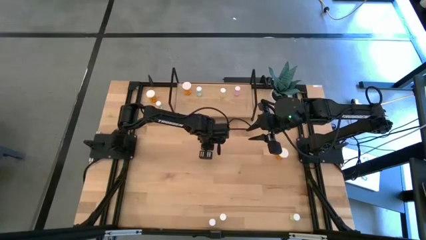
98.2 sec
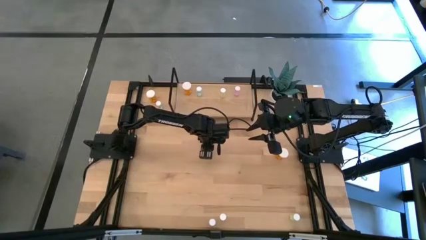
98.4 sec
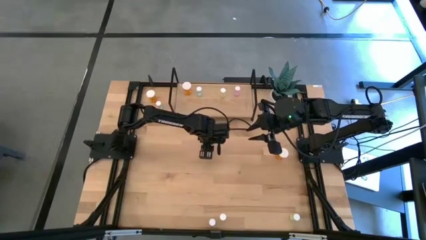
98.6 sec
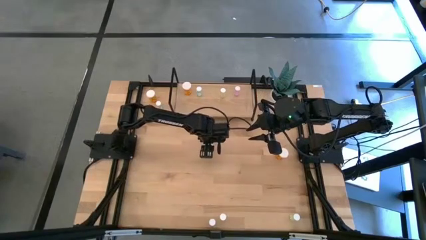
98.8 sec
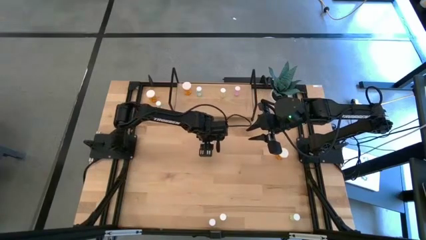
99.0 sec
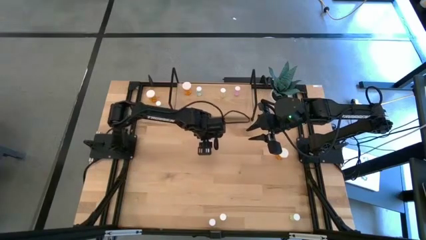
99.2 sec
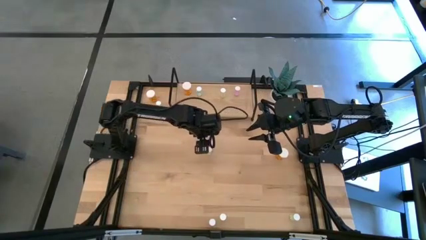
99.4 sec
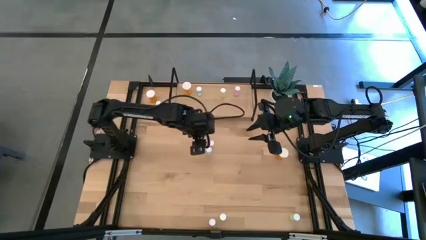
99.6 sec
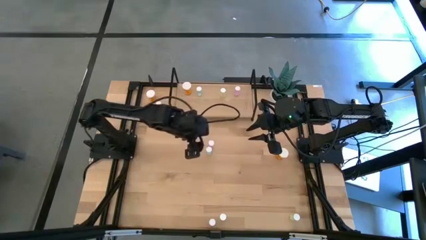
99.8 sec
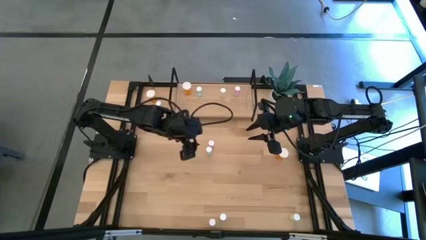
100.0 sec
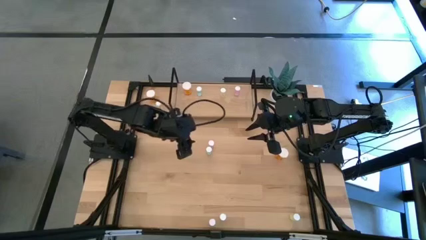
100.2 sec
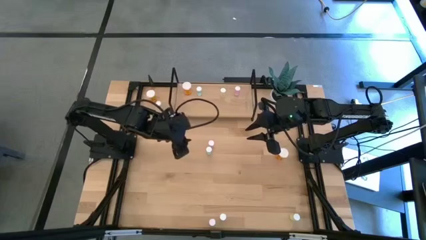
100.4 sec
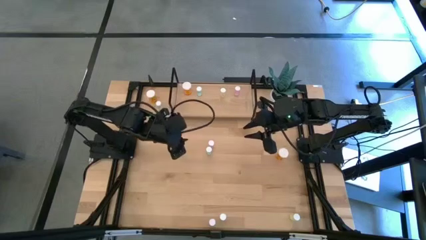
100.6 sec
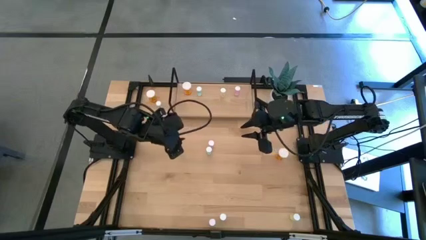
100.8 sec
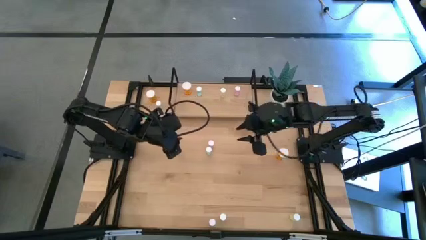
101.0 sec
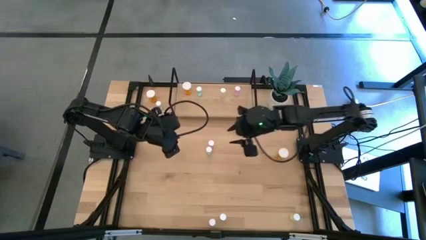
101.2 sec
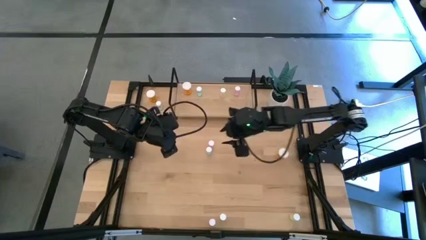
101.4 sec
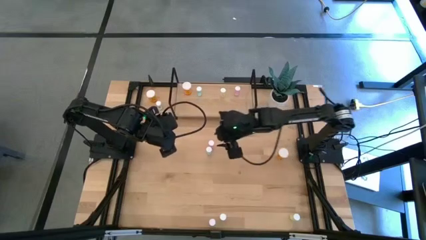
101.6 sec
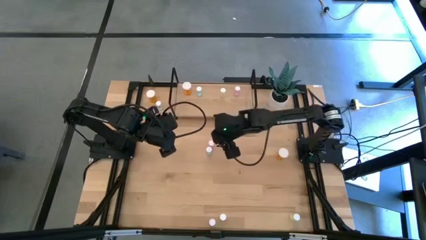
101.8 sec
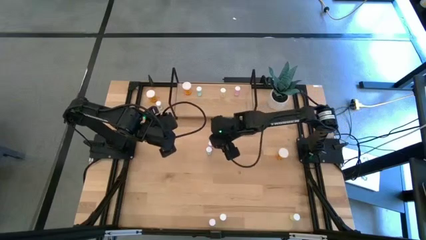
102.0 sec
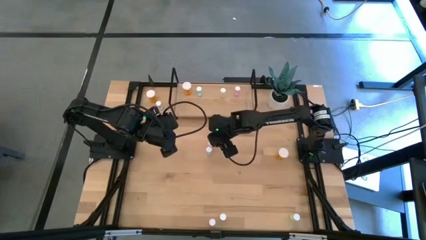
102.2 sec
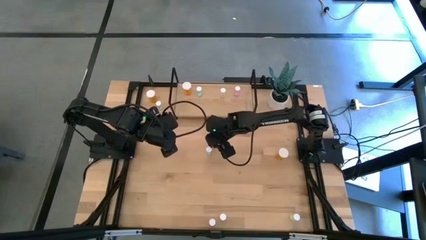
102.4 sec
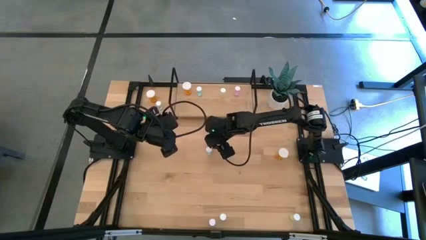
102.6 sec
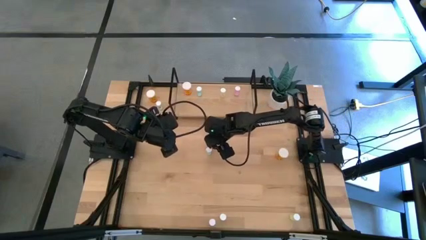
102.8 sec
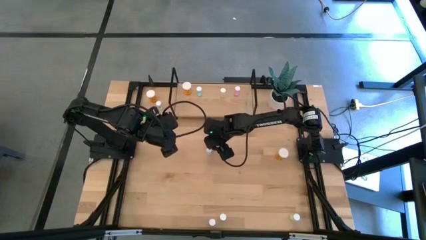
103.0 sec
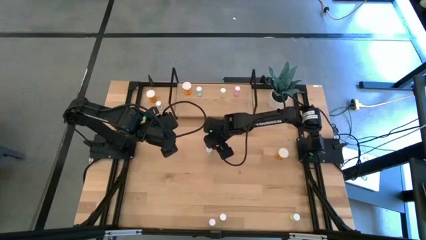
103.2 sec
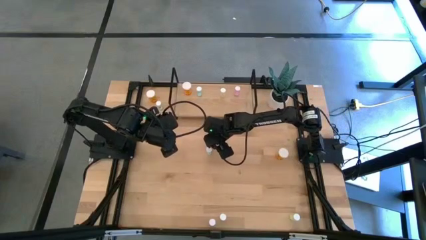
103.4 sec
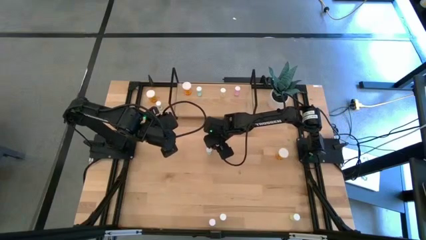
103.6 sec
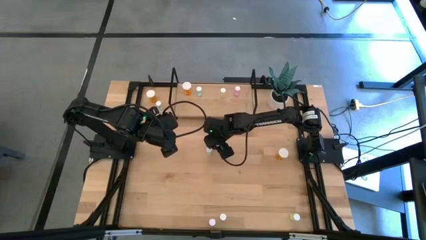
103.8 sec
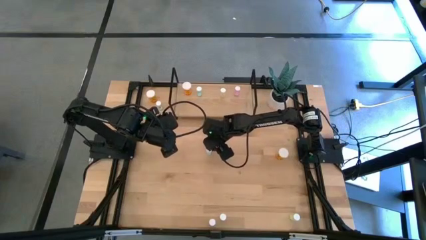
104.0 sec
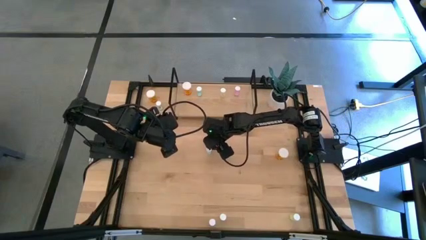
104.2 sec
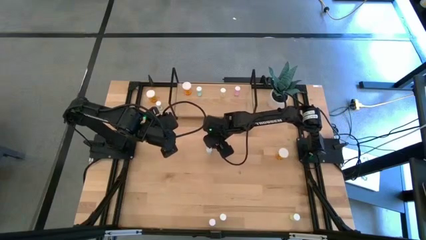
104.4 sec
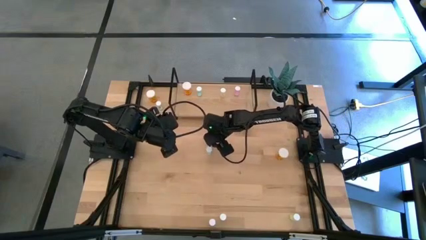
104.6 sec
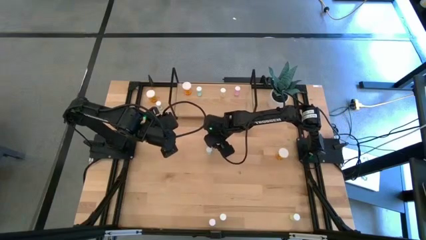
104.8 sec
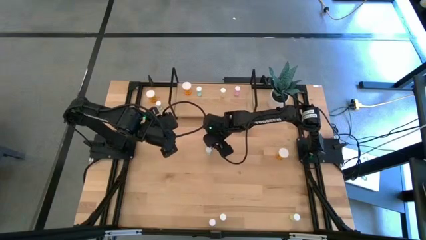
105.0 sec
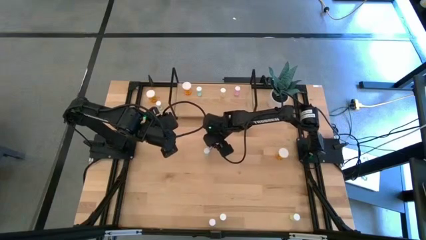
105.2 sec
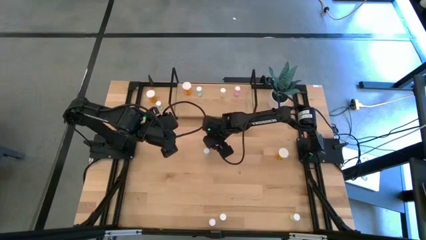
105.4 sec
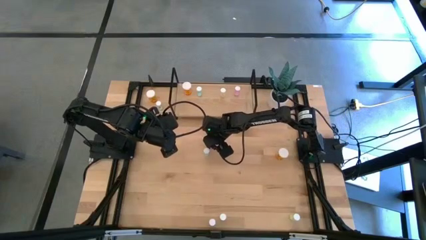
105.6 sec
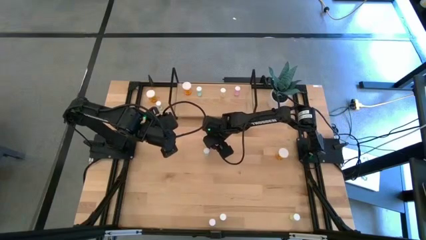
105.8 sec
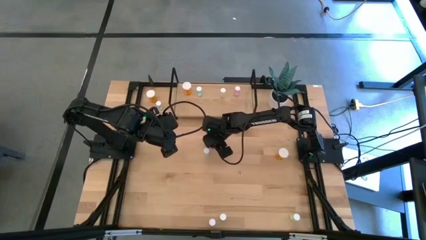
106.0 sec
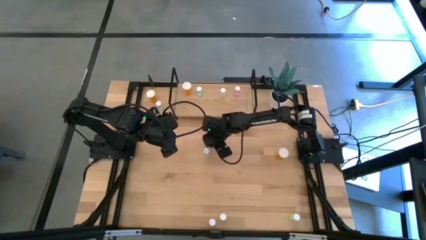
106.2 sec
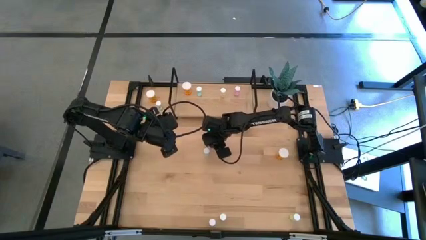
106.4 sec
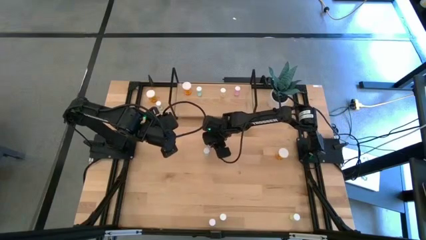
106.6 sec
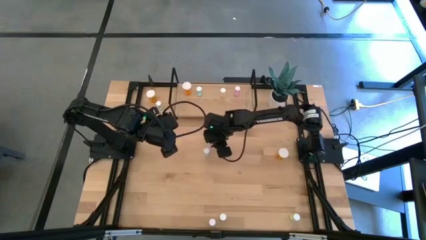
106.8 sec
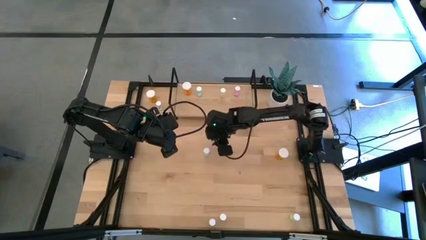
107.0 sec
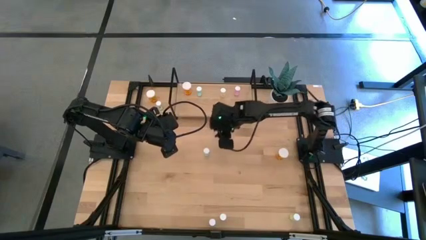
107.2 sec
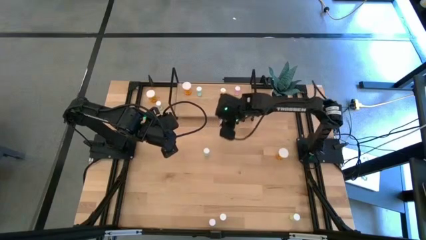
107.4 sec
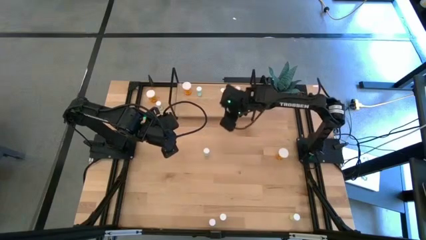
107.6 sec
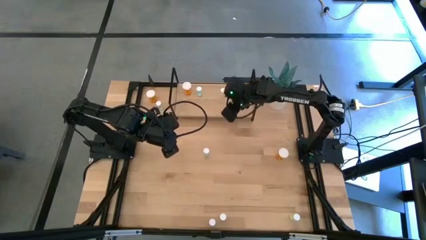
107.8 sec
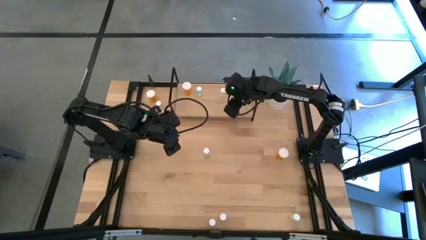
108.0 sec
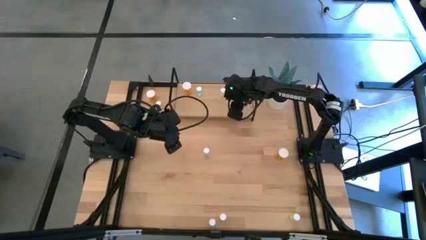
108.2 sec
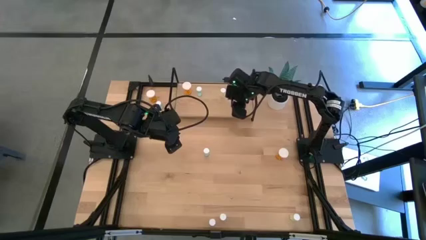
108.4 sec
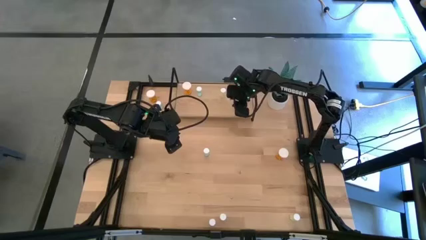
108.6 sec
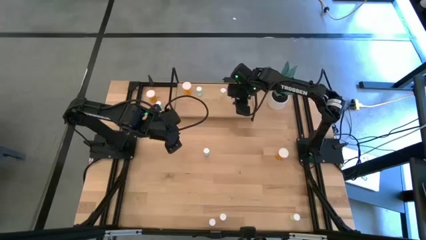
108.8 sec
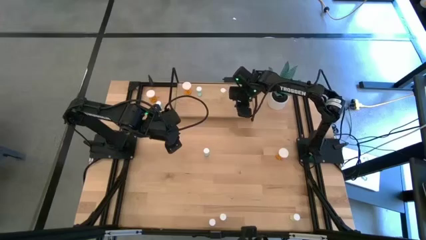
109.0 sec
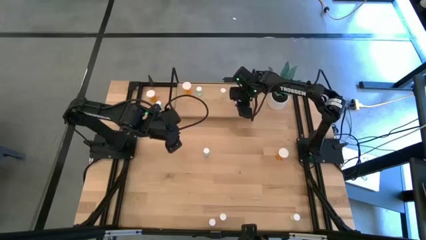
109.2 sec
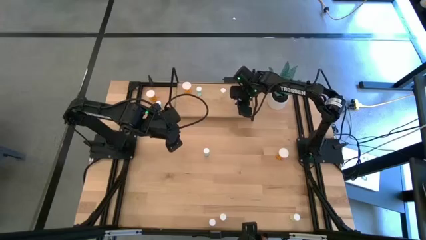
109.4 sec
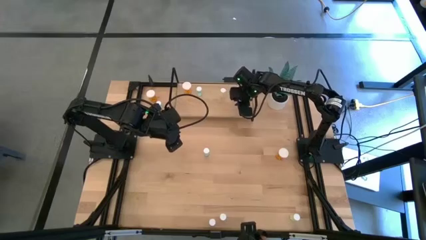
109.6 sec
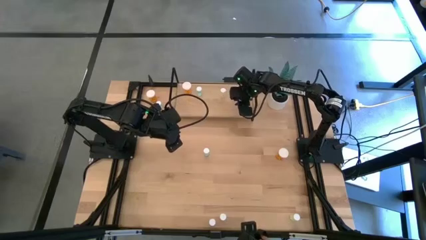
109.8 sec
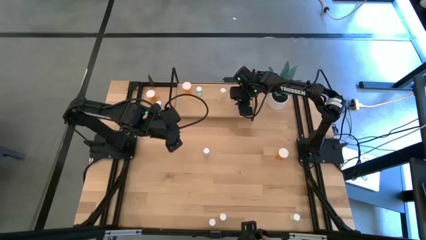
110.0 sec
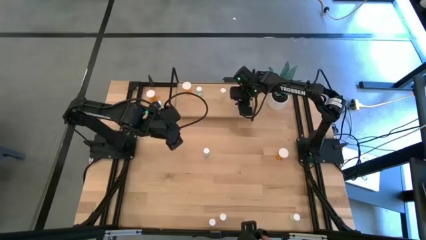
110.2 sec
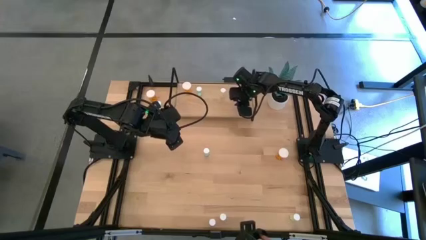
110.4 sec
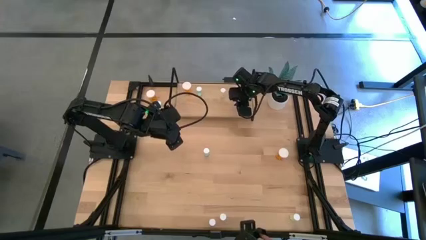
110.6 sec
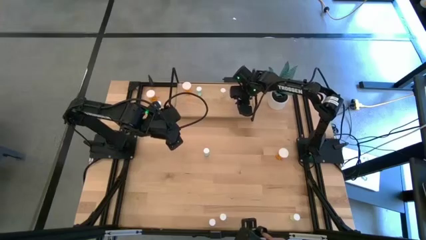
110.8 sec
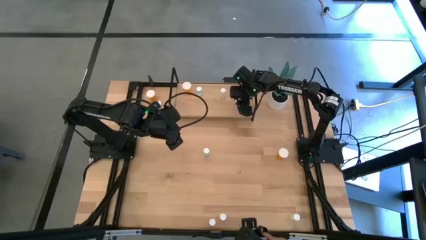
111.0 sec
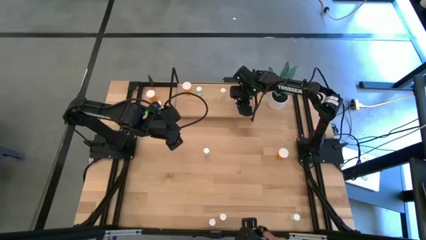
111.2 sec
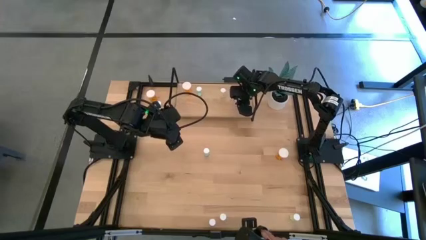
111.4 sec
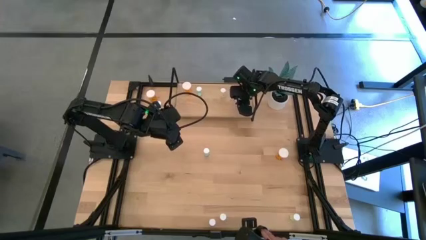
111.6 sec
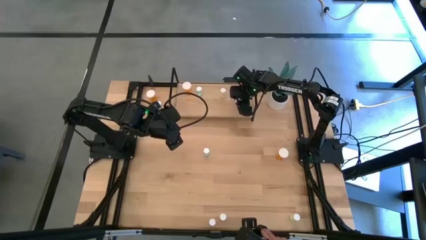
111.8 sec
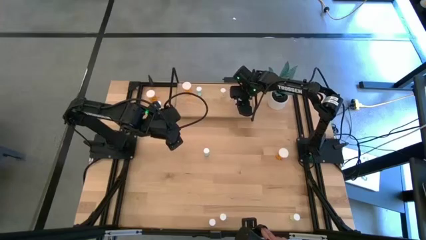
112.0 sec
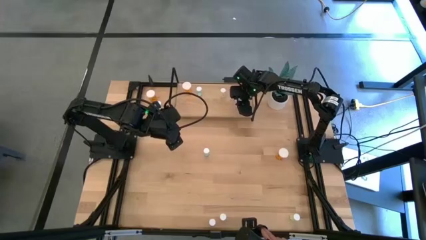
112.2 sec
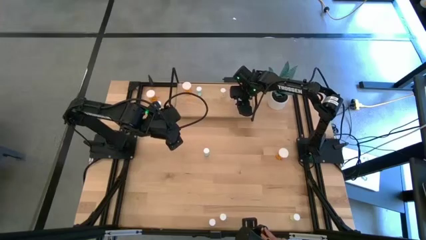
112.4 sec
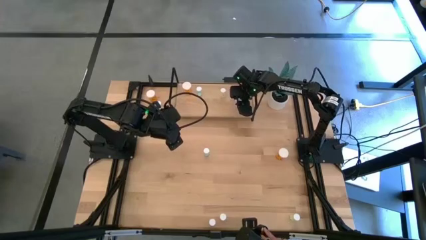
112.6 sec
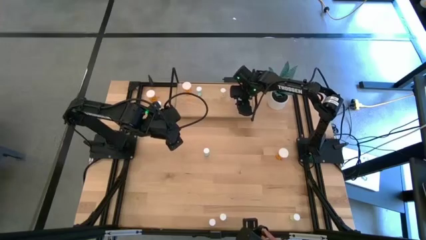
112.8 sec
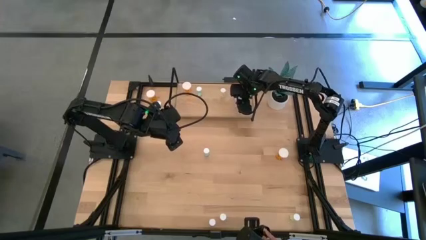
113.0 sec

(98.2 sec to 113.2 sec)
Task: Pick and place medicine bottles onto shelf by color
Put the left pink pill bottle on the shelf aligned with the other pink pill bottle
